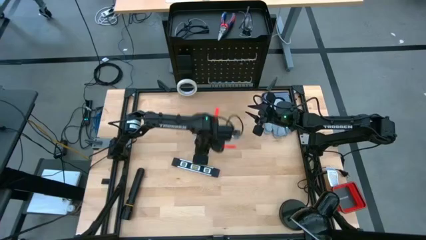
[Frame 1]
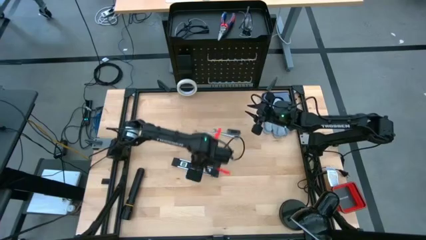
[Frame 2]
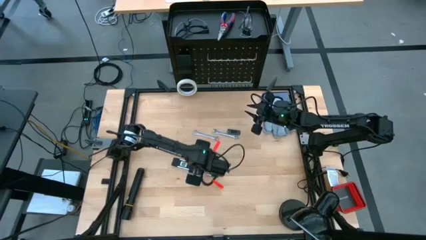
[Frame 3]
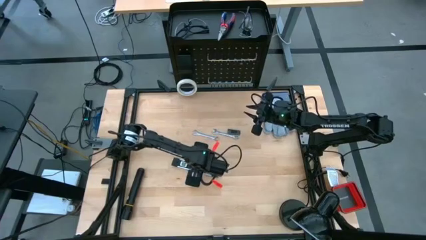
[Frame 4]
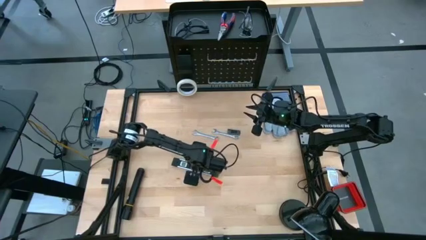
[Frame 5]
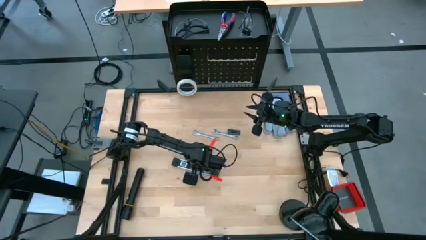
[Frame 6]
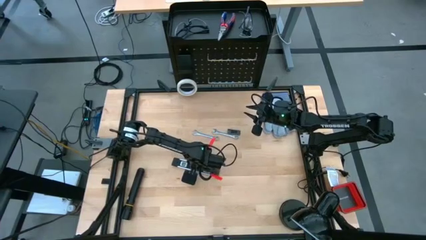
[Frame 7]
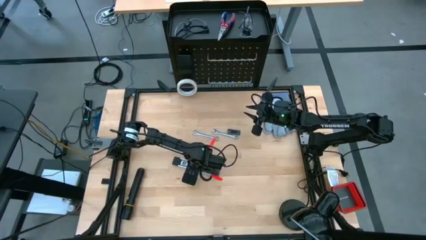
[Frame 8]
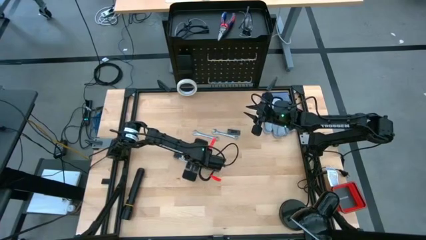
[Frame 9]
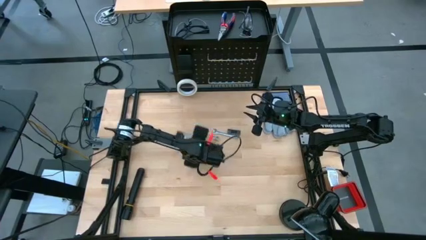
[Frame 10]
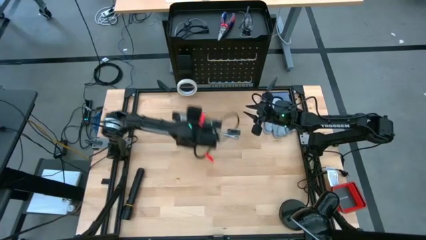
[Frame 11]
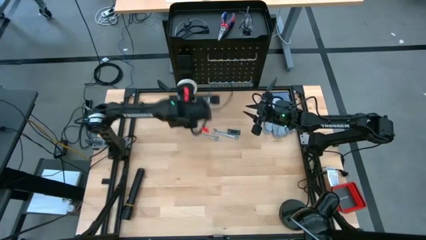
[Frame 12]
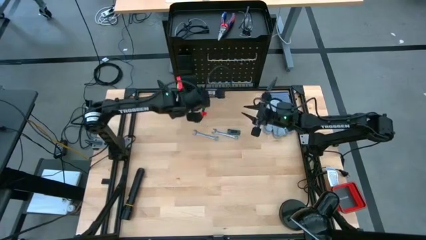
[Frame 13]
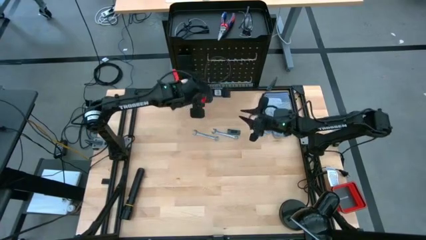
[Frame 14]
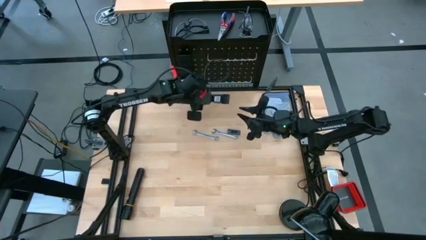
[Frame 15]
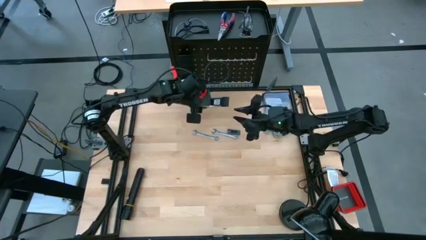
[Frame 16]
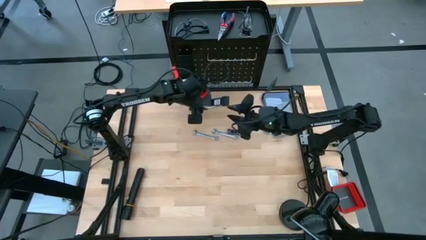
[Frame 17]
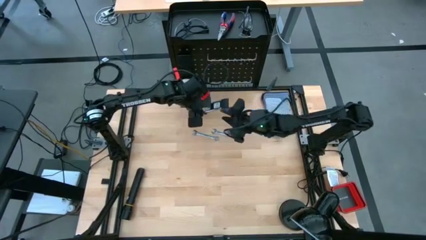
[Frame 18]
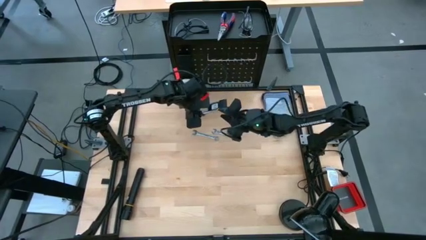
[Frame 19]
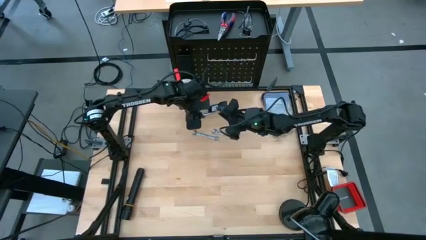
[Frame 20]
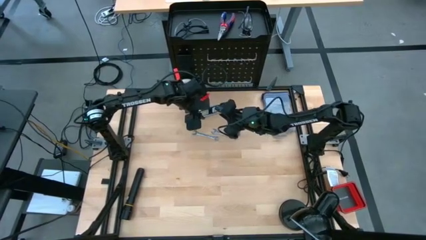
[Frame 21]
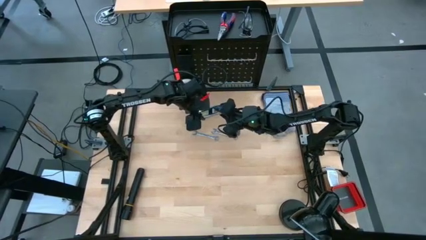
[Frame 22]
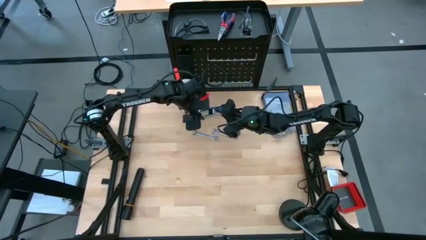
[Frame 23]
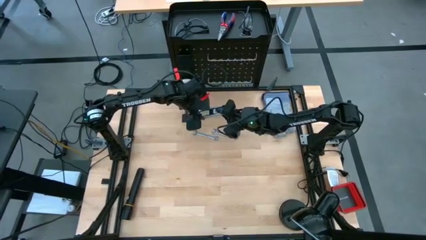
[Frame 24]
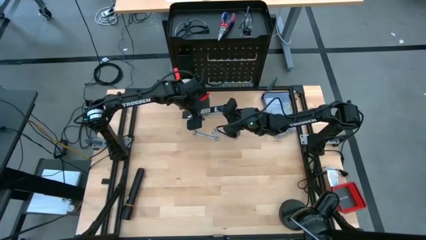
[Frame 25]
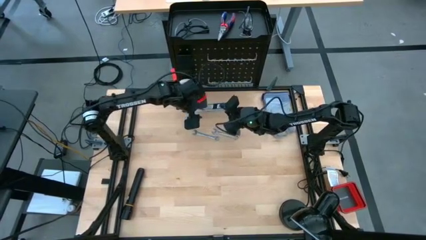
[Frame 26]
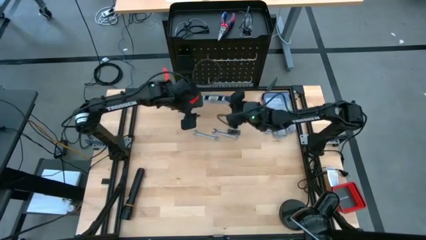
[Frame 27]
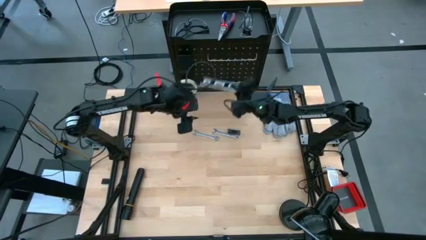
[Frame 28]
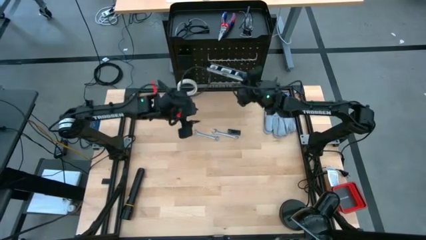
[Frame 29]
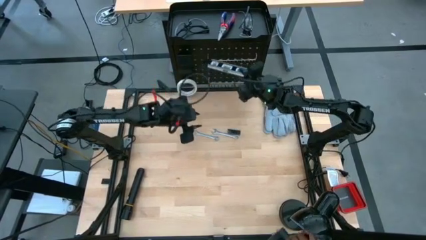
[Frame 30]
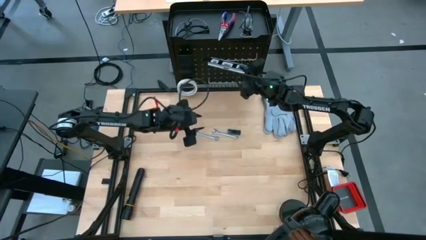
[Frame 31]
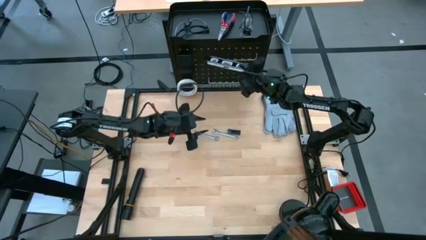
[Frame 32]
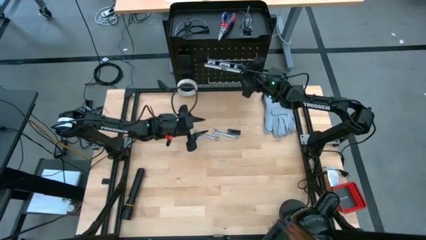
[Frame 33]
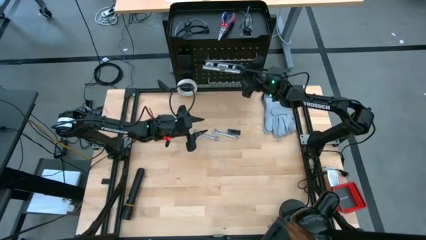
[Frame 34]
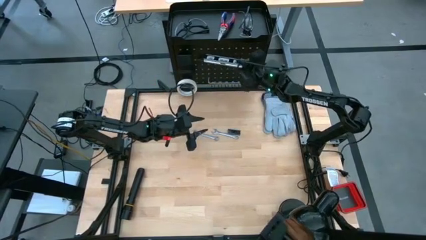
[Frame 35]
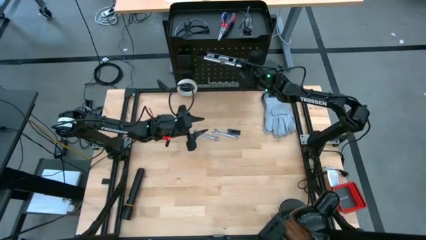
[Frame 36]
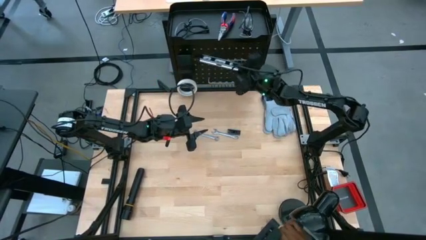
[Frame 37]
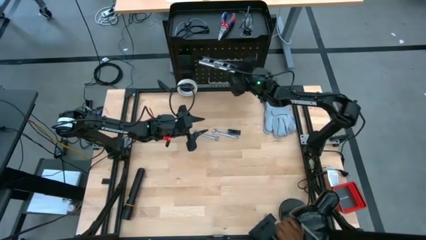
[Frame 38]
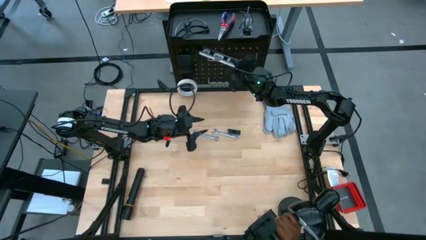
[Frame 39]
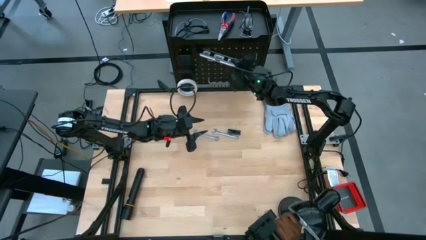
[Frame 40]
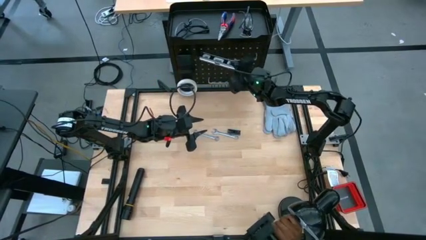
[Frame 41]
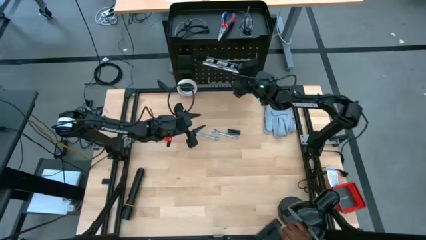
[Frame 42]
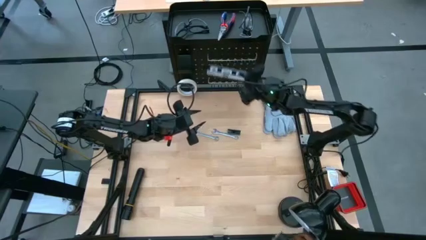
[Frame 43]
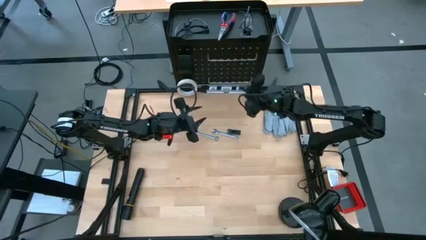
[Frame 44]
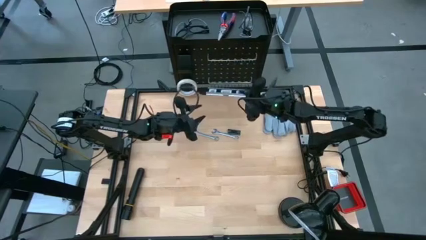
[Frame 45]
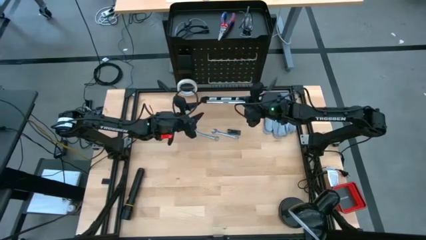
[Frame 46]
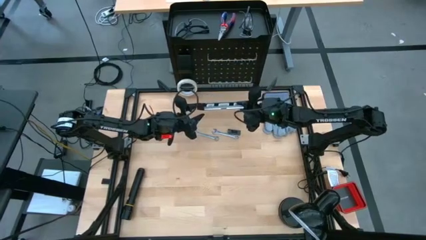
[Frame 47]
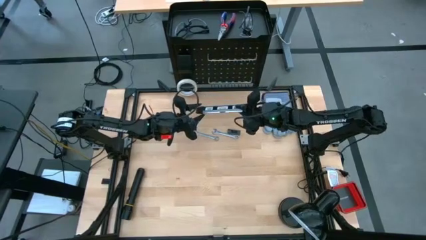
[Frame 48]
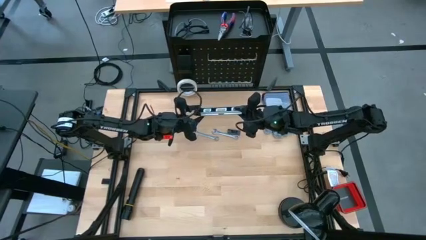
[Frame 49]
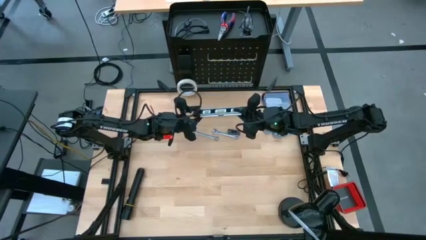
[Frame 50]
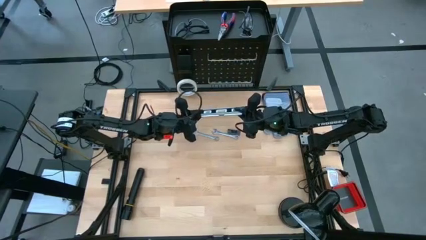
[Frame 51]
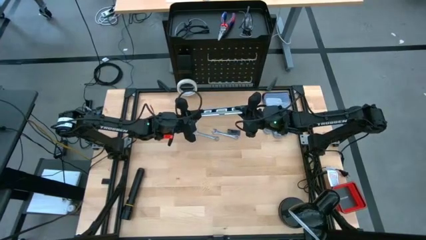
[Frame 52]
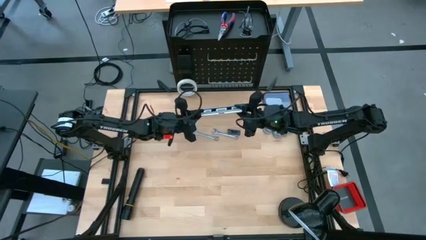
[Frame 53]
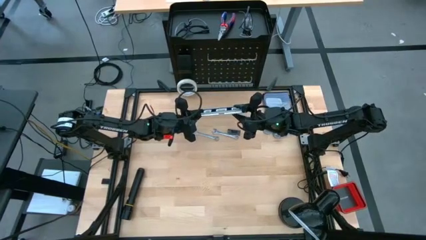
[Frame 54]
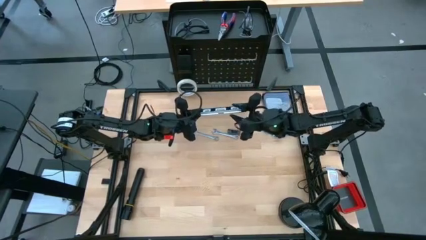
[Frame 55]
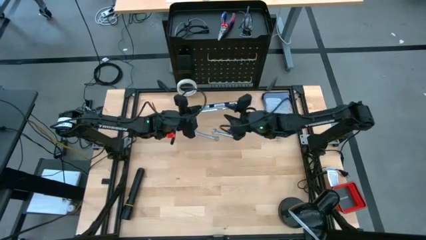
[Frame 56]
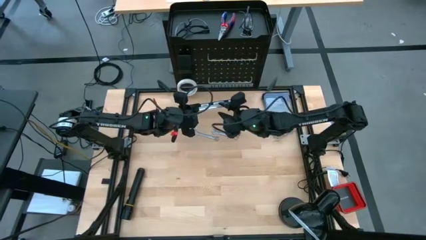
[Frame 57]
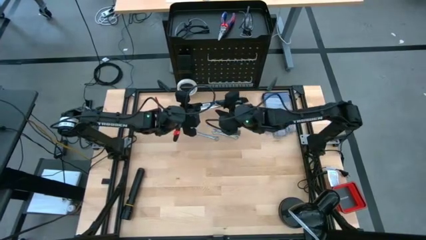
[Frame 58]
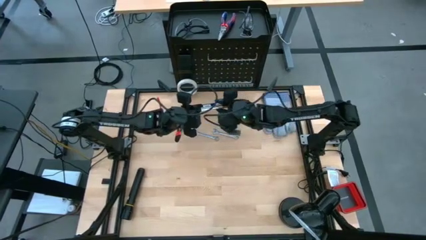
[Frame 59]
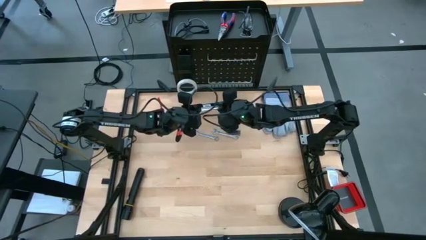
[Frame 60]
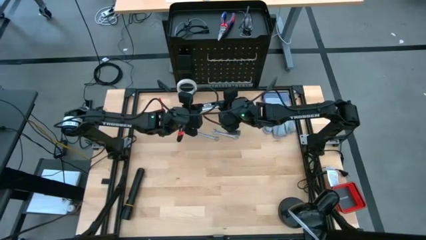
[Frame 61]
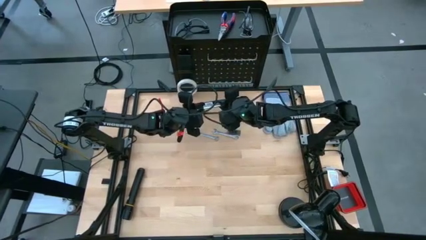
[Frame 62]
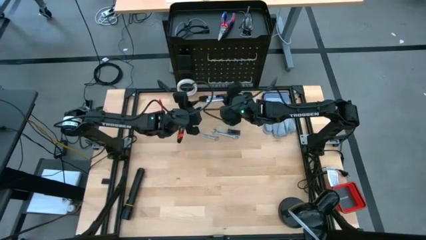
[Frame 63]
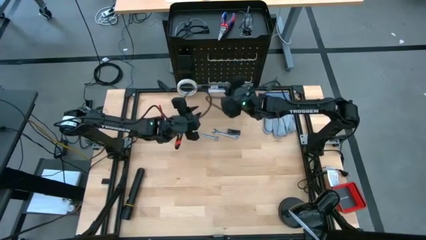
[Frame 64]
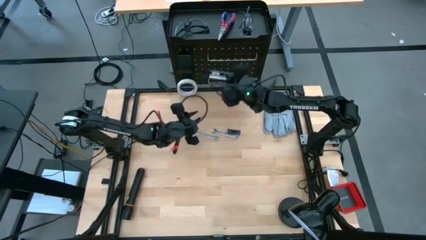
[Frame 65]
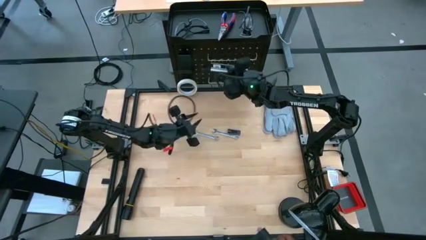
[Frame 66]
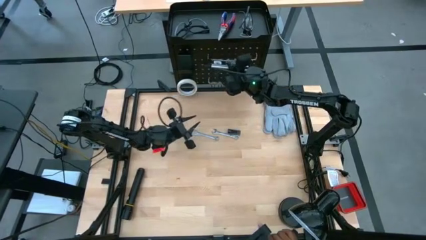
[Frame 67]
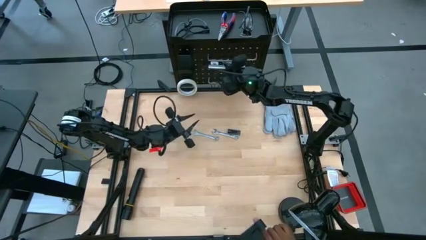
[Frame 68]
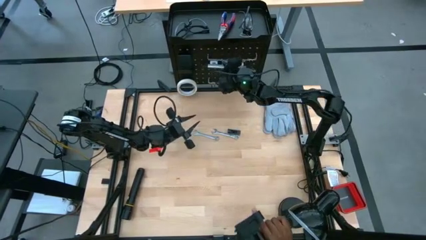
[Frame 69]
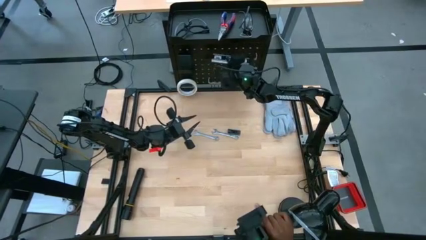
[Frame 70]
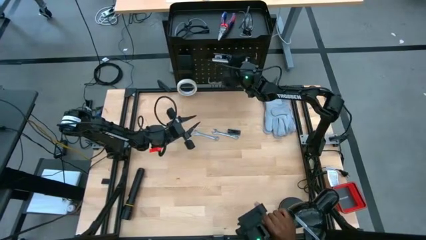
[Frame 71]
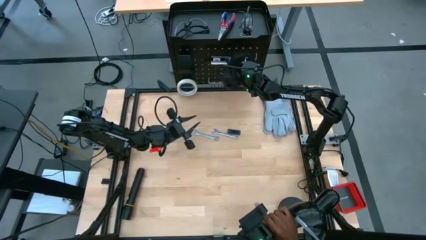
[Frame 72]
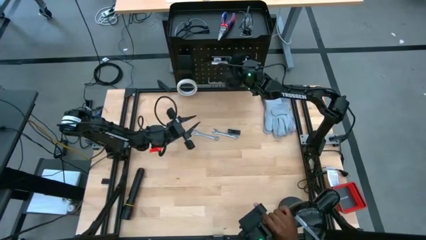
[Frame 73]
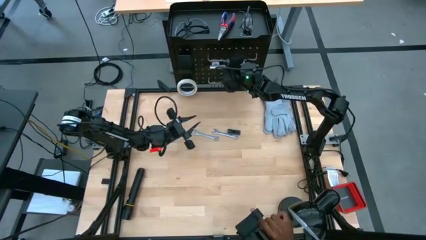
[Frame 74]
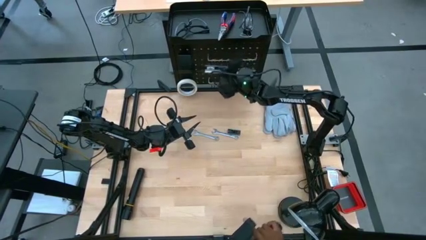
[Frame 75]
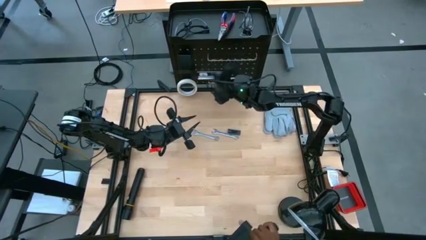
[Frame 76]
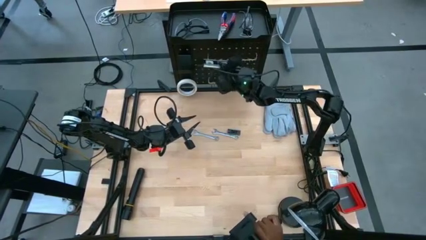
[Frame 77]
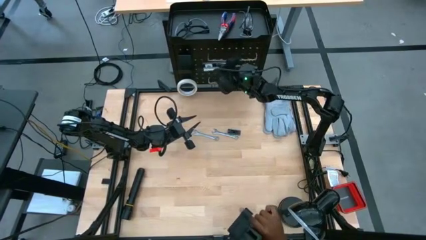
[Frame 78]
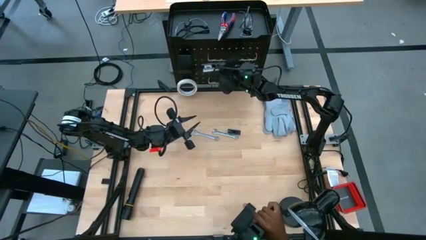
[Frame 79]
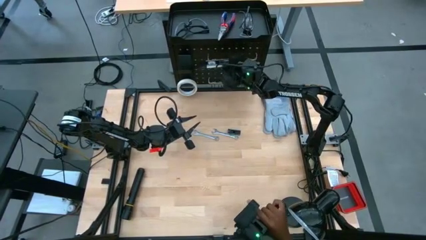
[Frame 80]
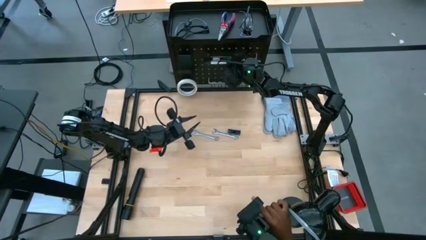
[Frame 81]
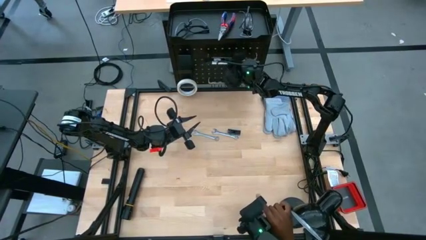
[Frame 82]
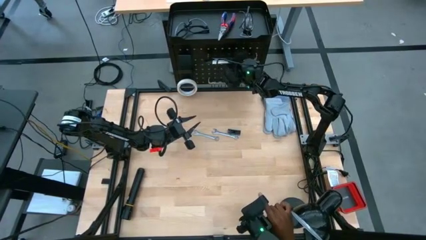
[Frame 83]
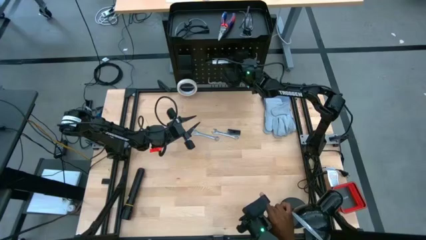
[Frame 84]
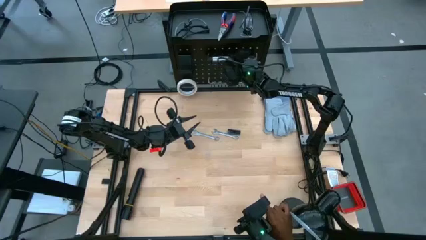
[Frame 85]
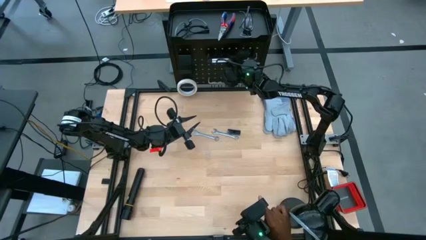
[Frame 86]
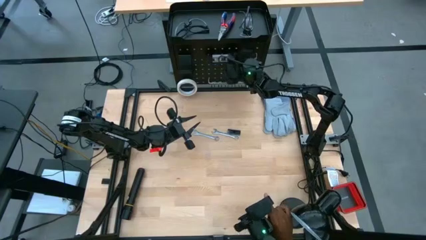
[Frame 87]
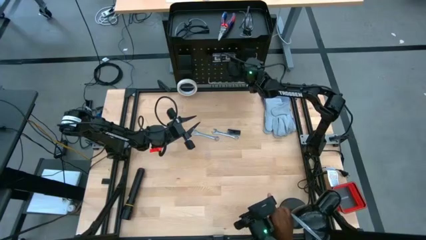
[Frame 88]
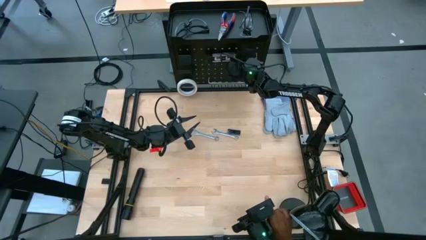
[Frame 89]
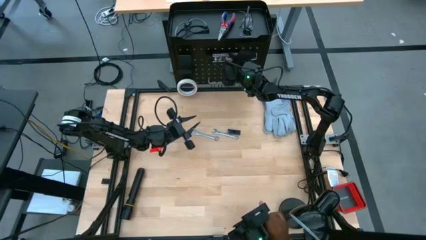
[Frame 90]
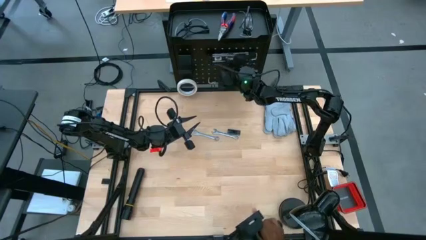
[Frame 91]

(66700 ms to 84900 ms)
Task: Hang tools onto peg board
Put the black spirit level on the black pegboard
